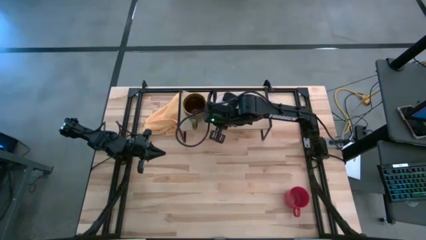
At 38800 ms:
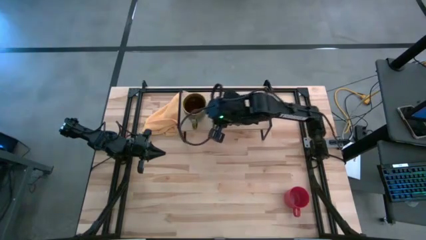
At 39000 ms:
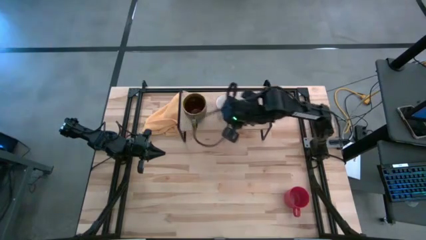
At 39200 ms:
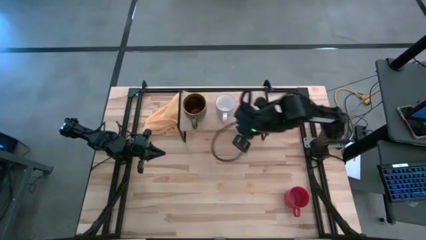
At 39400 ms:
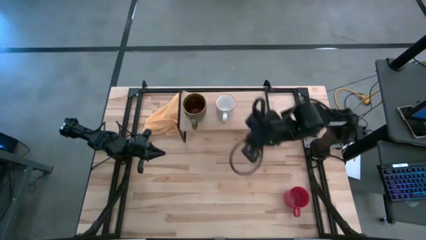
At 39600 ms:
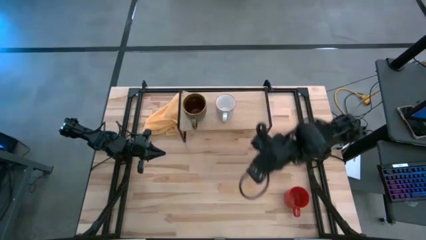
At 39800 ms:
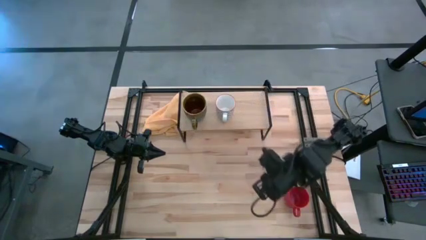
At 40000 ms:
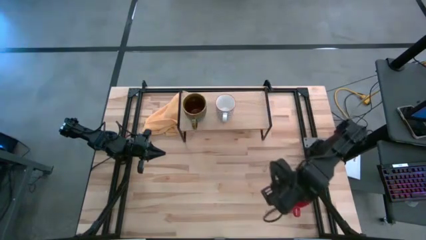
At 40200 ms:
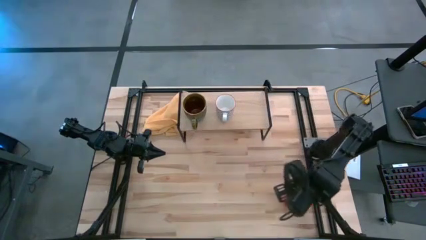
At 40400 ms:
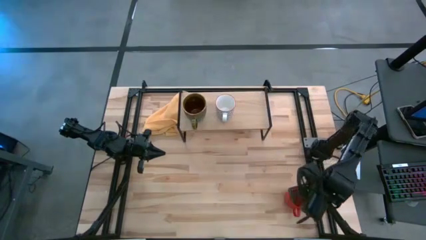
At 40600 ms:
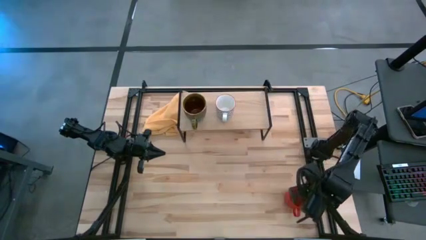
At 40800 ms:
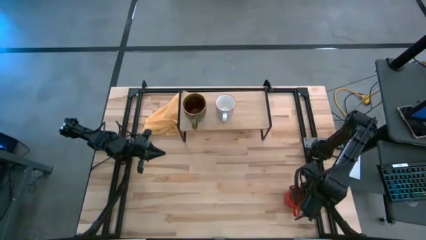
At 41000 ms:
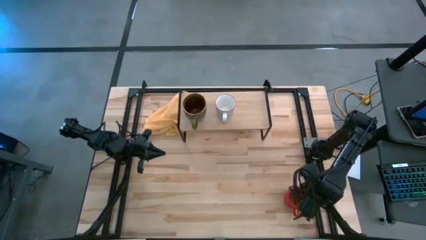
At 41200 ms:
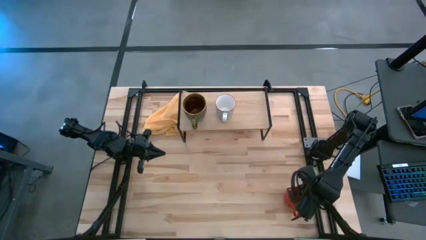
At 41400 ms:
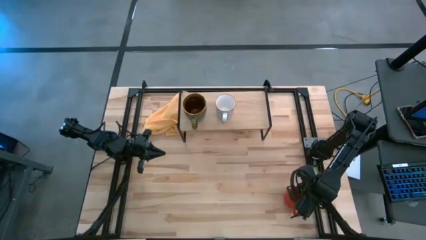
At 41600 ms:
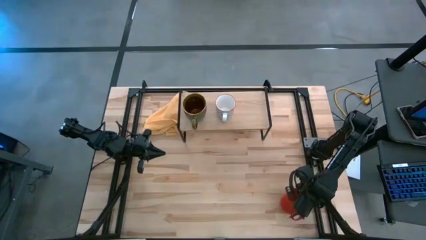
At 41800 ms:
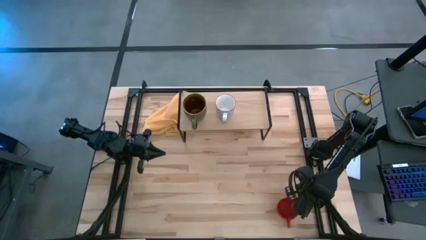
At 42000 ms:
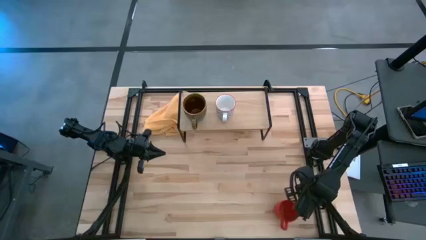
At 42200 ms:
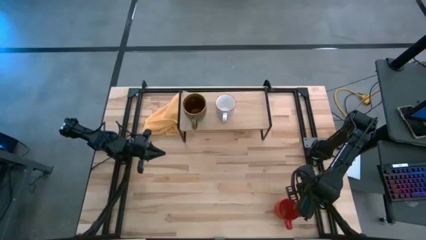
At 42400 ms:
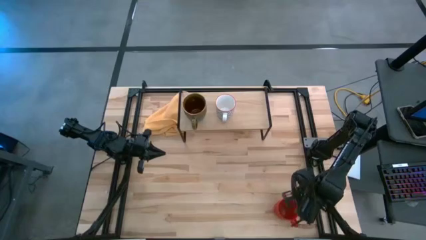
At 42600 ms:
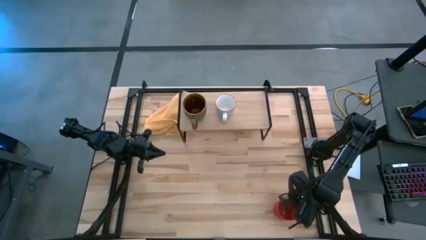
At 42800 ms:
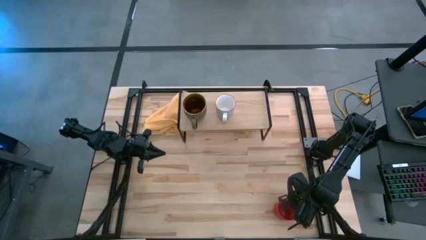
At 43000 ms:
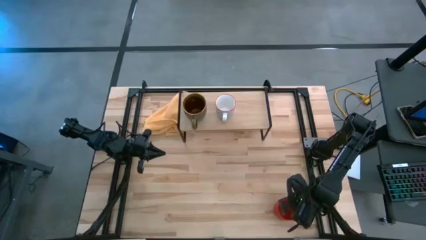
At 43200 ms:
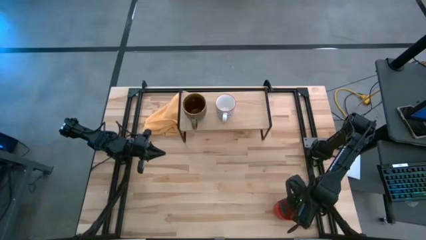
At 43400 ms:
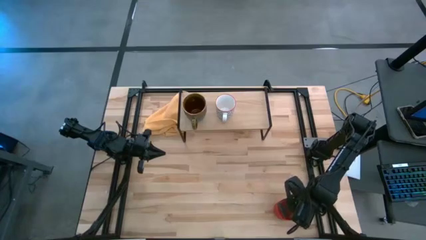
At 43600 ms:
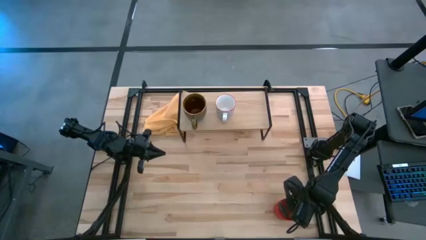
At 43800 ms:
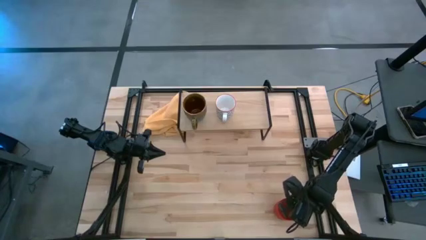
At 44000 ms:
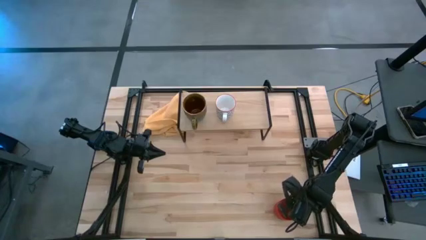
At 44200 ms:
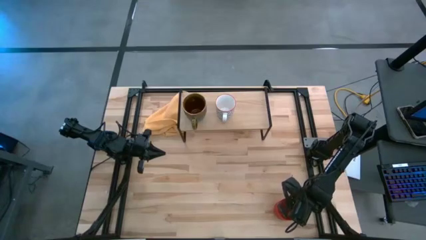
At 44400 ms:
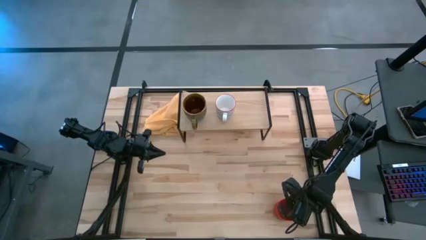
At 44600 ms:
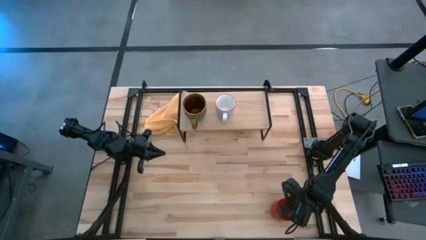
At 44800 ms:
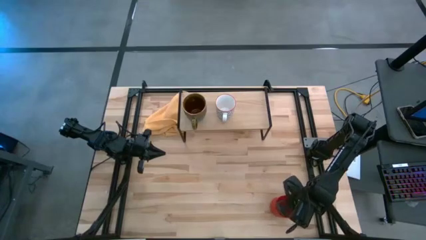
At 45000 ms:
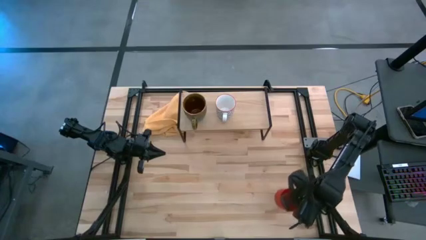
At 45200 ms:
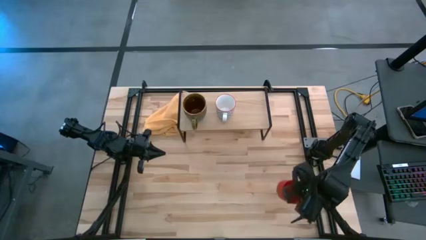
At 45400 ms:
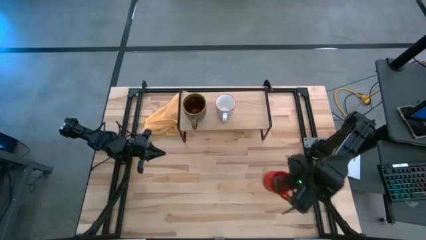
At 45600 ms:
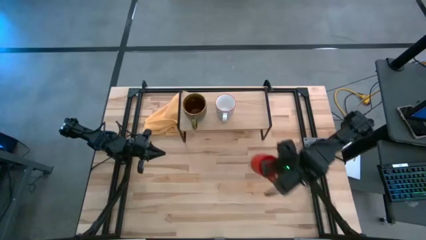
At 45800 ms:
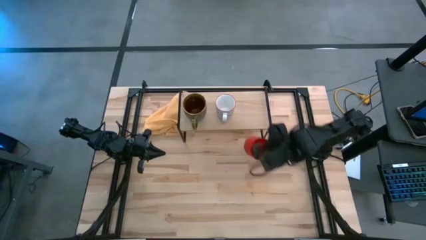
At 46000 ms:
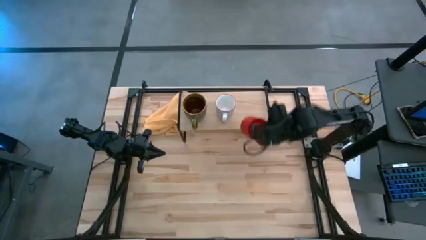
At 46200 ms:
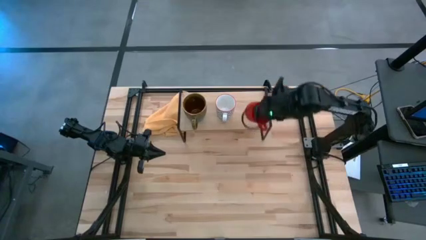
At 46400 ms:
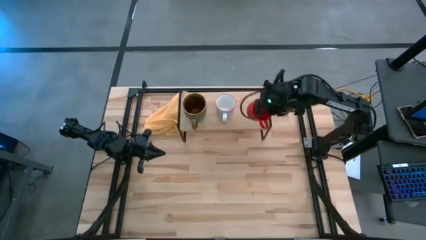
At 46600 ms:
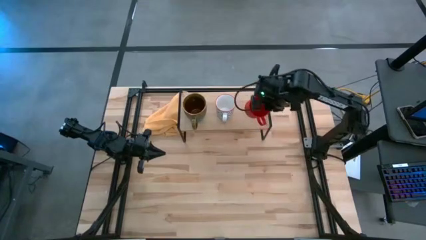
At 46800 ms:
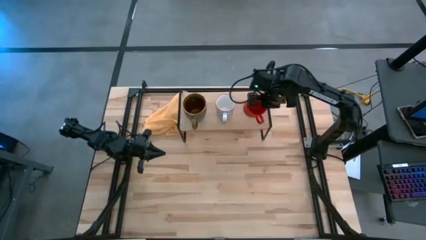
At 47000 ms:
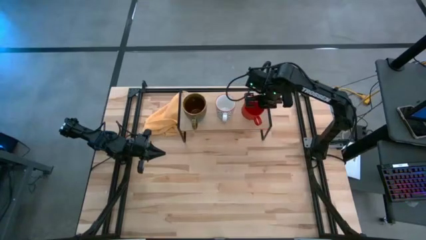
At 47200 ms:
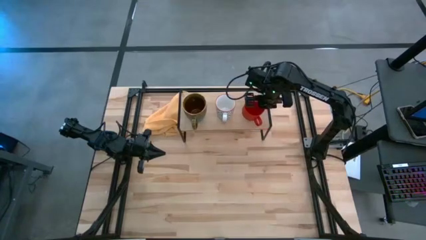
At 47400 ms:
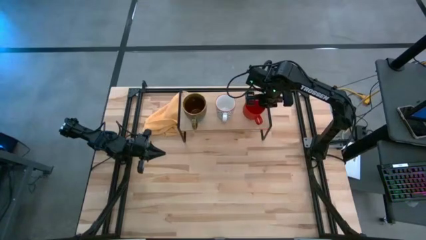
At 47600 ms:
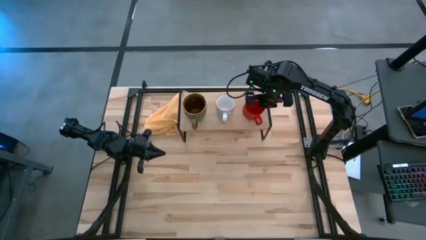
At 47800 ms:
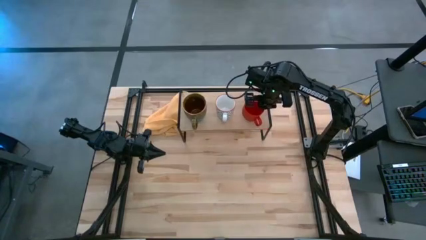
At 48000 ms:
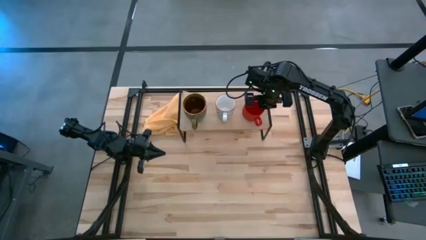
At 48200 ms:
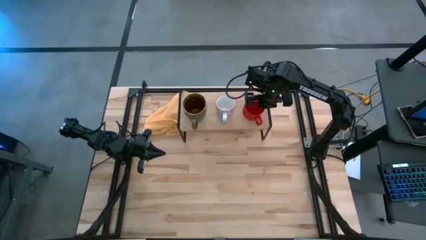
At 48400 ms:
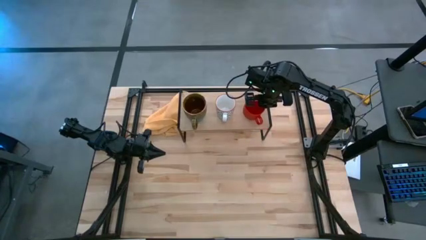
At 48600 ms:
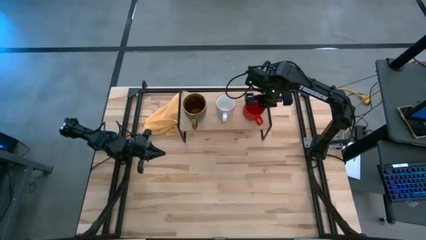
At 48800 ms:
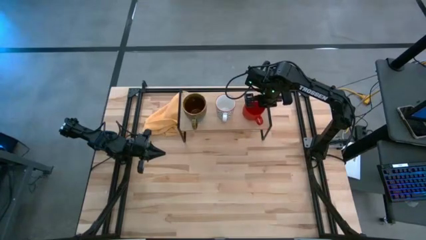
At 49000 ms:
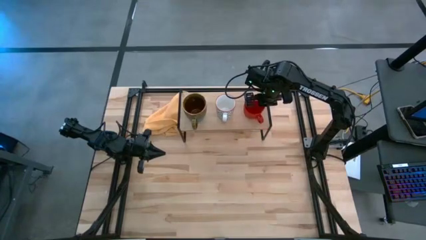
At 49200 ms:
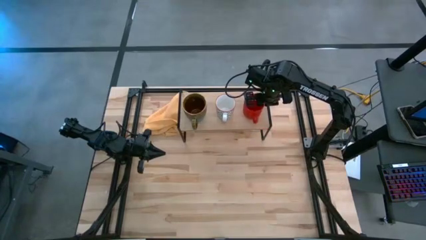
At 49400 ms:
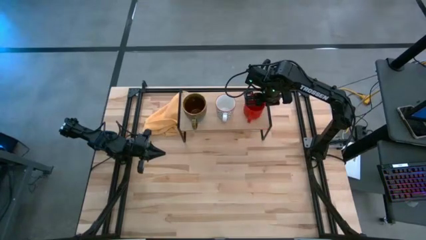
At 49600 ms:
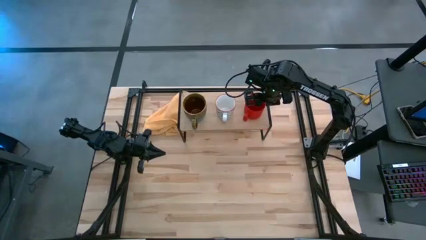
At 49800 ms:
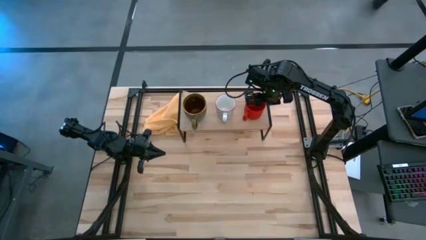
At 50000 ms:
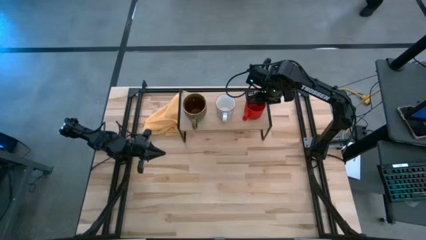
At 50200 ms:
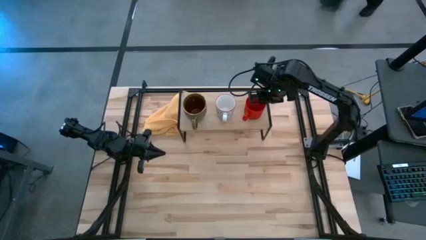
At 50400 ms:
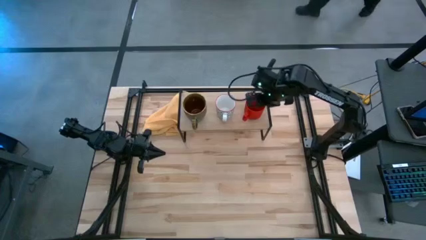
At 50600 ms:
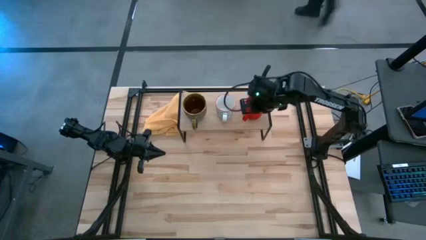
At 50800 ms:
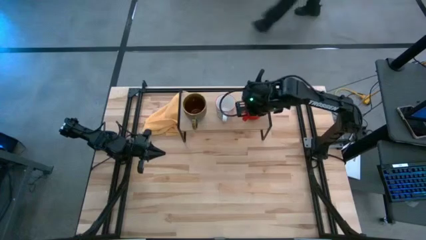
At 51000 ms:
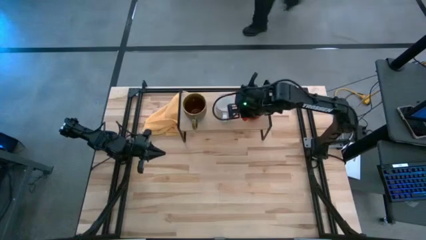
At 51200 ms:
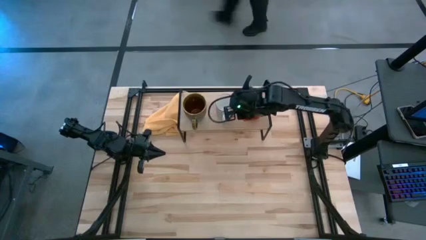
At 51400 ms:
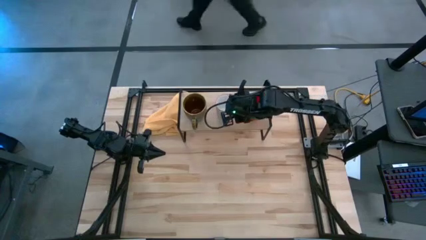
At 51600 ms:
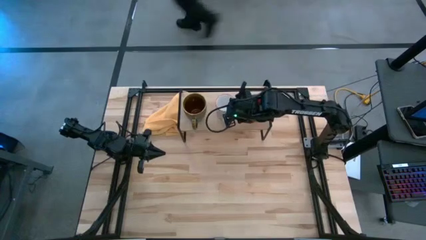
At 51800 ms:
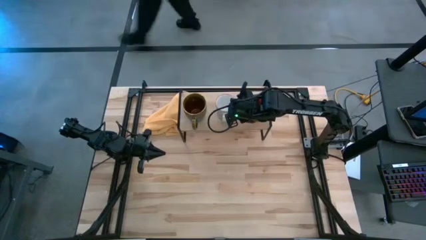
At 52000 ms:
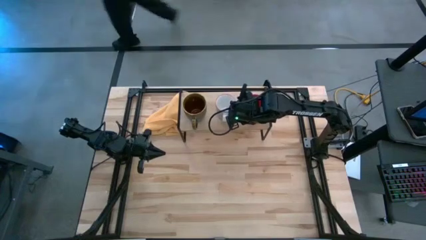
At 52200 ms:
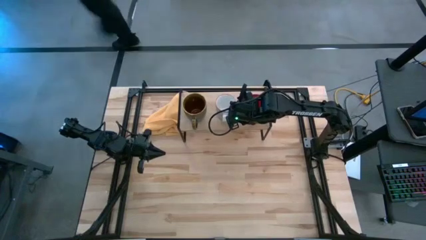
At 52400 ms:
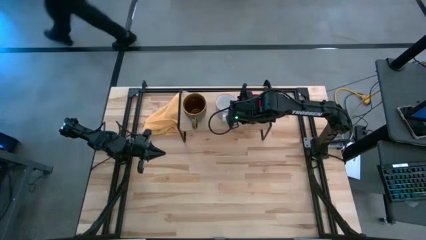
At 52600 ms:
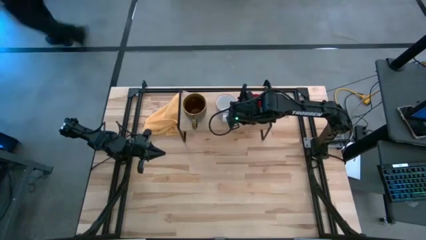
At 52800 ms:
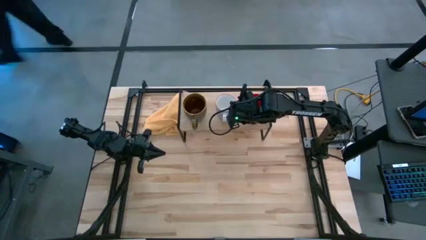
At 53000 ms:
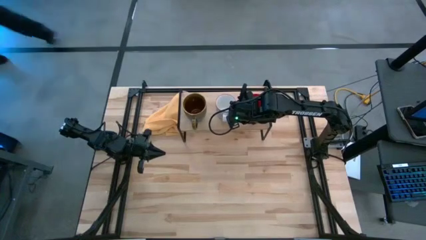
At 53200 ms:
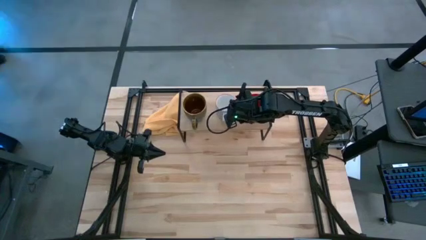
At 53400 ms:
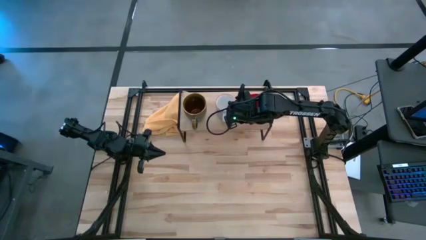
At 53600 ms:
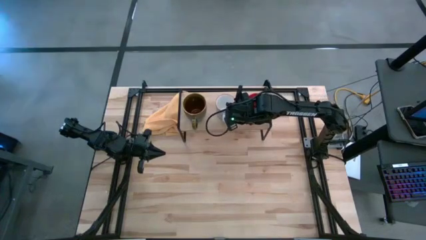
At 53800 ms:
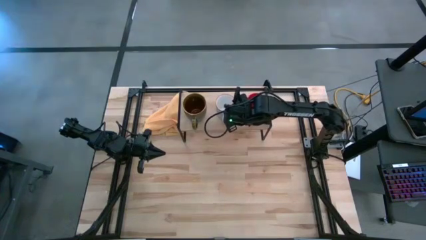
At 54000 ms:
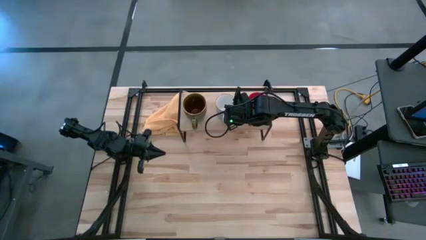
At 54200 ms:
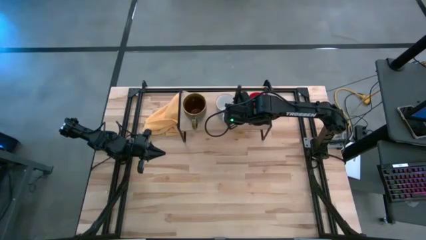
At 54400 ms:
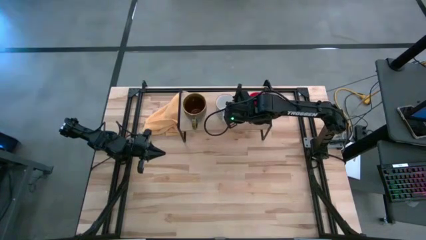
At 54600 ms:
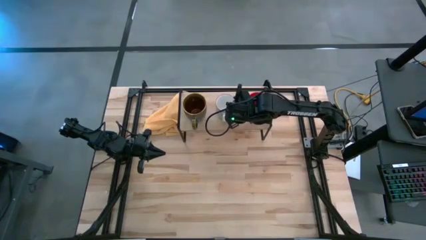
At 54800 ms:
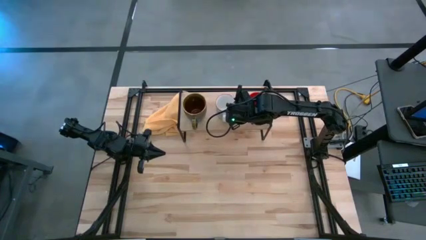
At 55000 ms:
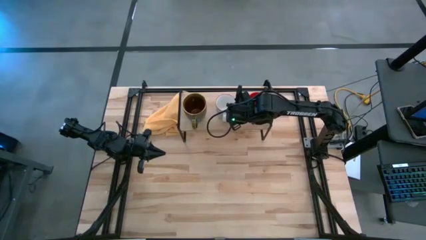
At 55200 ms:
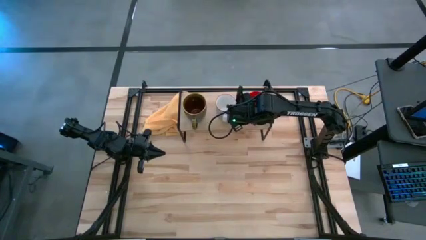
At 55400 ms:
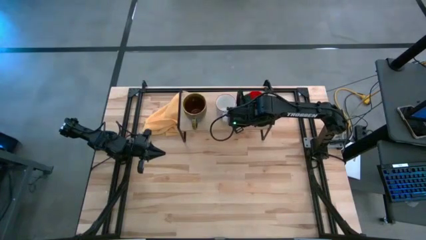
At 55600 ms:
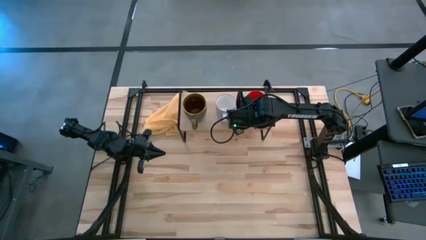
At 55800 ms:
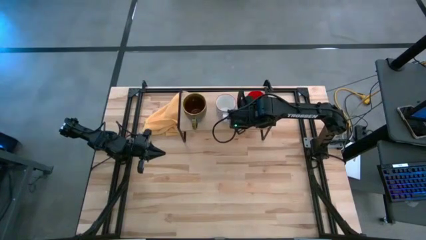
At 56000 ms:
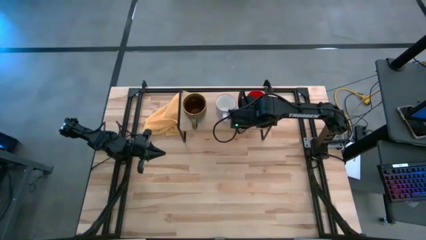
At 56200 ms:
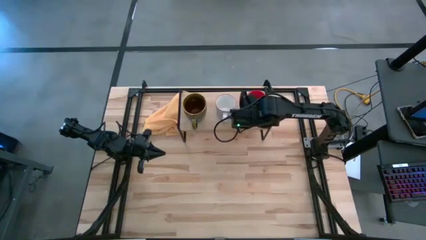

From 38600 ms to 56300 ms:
Task: Stack small to large cups/mugs on shelf
Put the red mug on the shelf
